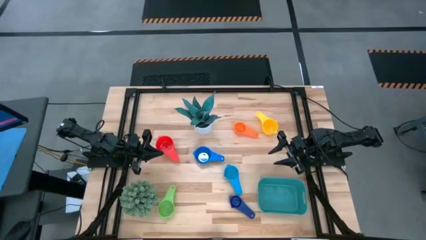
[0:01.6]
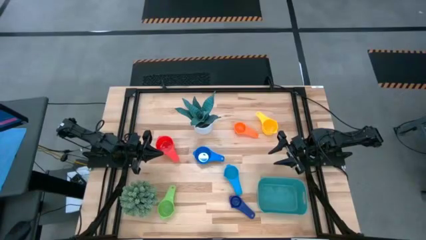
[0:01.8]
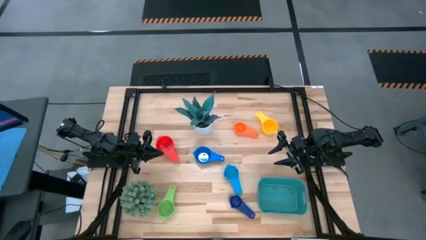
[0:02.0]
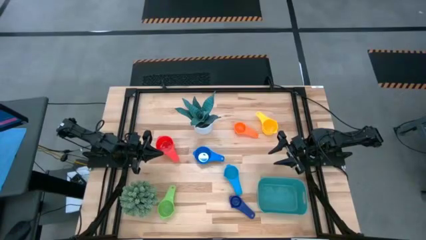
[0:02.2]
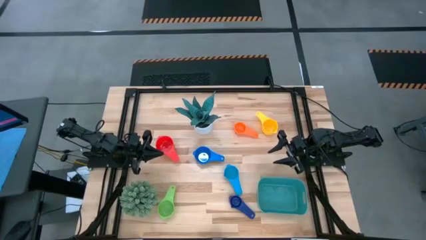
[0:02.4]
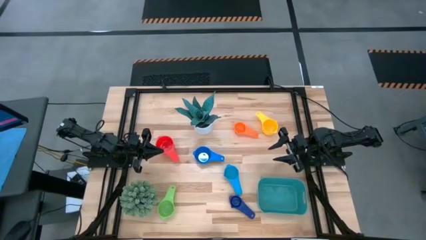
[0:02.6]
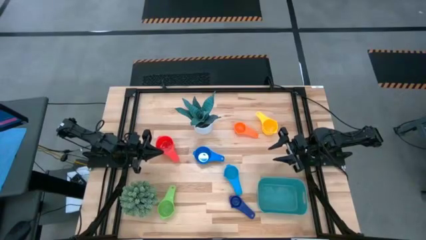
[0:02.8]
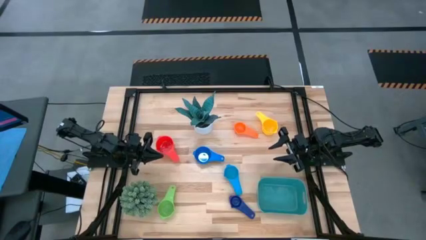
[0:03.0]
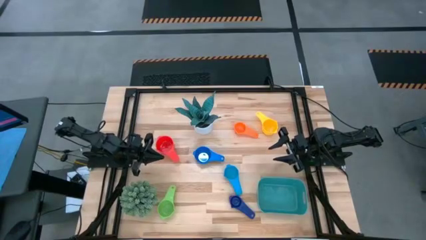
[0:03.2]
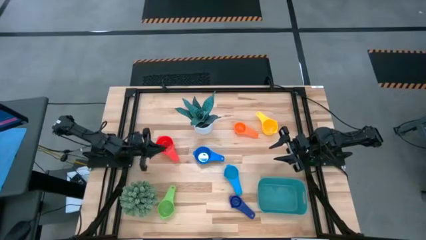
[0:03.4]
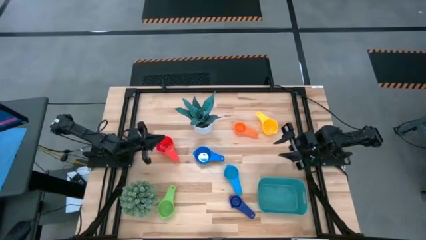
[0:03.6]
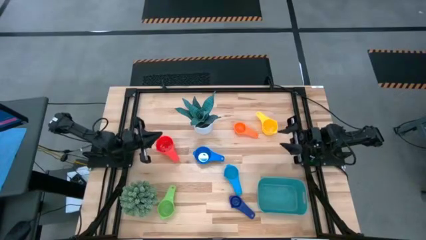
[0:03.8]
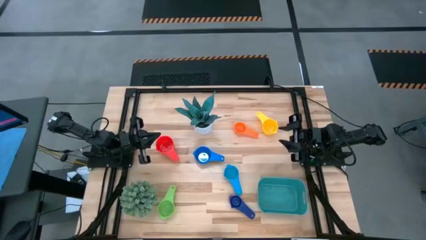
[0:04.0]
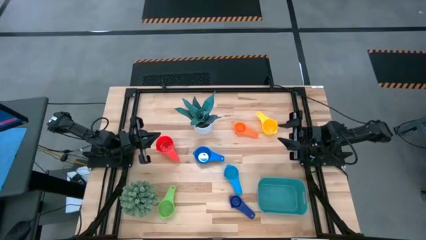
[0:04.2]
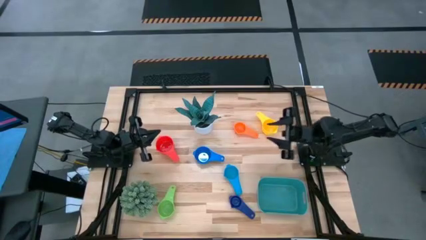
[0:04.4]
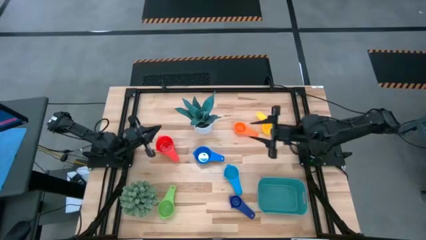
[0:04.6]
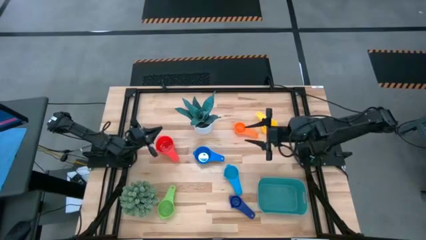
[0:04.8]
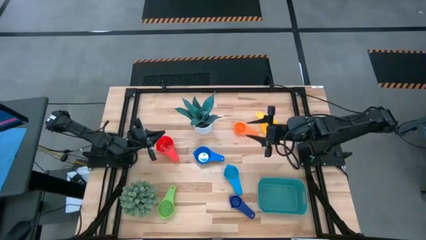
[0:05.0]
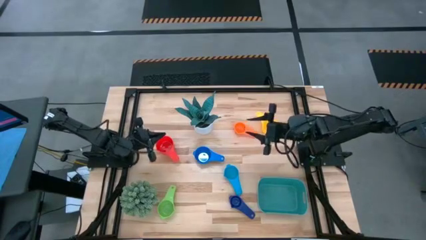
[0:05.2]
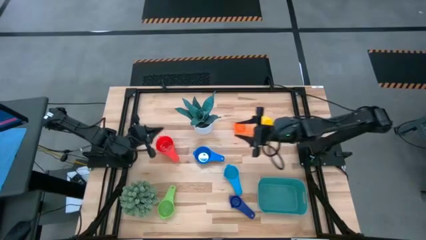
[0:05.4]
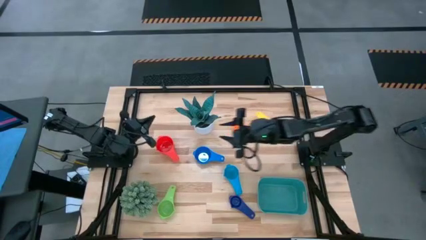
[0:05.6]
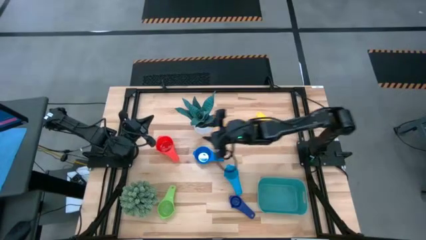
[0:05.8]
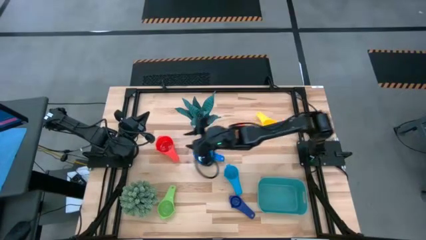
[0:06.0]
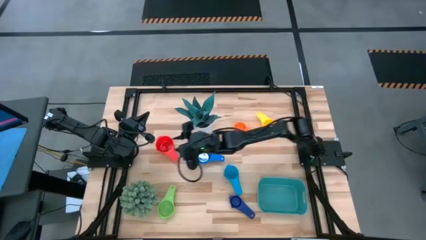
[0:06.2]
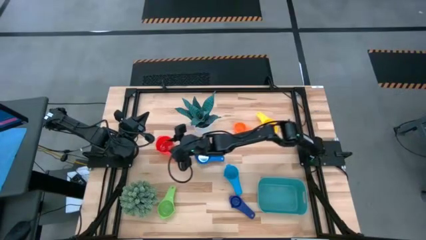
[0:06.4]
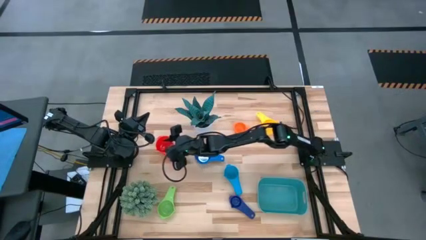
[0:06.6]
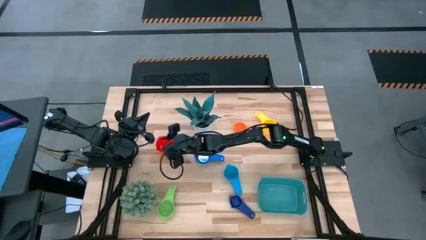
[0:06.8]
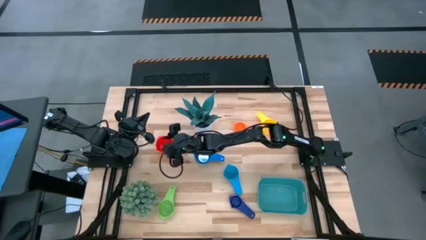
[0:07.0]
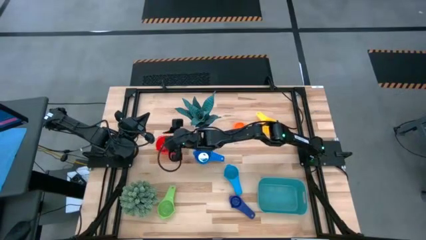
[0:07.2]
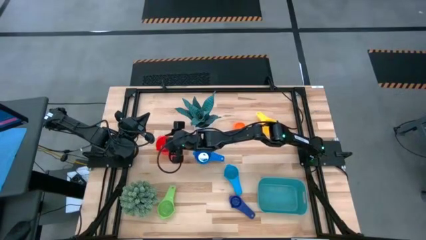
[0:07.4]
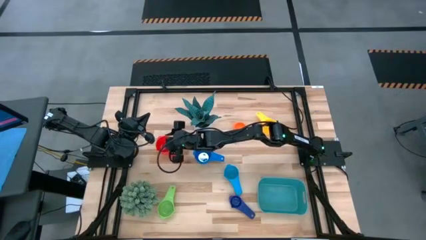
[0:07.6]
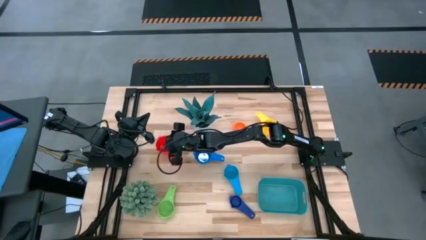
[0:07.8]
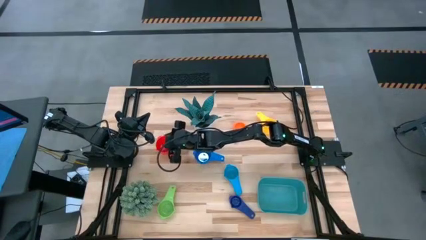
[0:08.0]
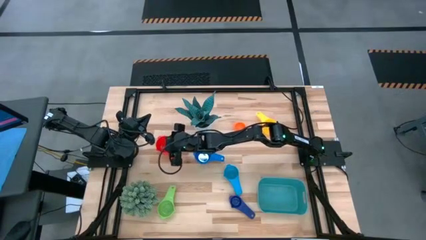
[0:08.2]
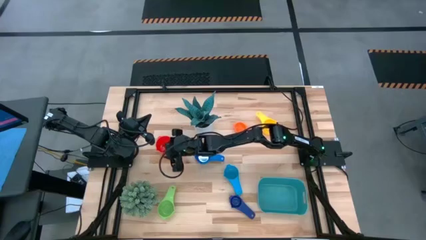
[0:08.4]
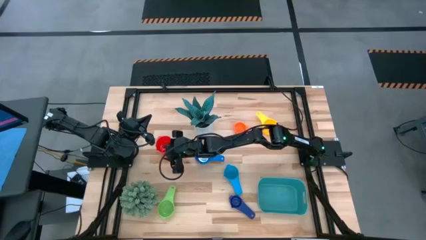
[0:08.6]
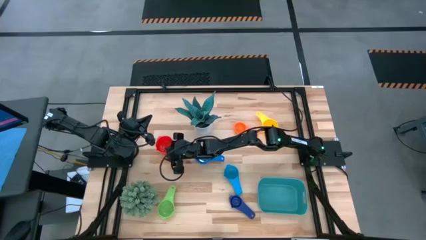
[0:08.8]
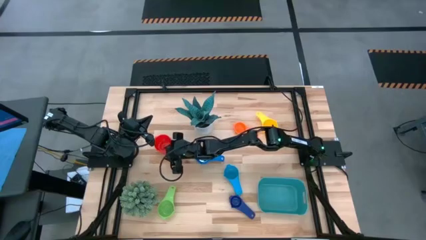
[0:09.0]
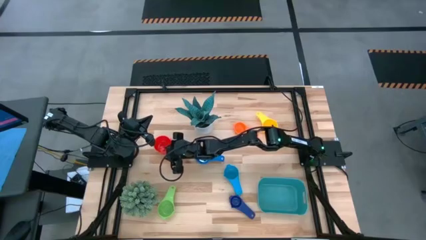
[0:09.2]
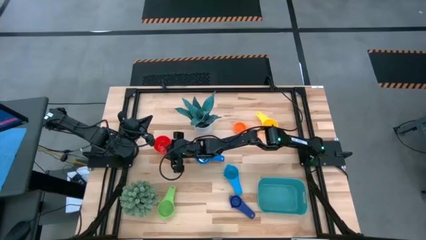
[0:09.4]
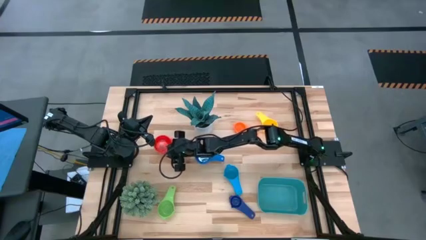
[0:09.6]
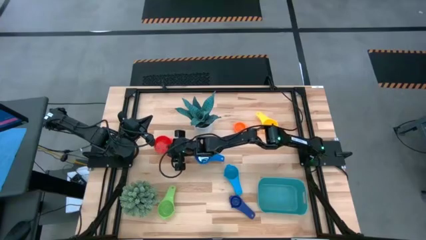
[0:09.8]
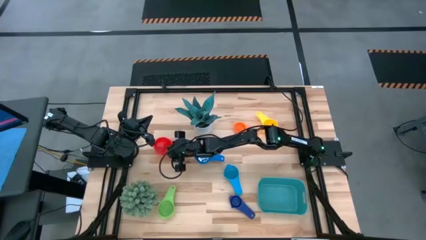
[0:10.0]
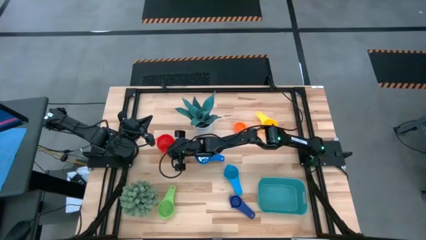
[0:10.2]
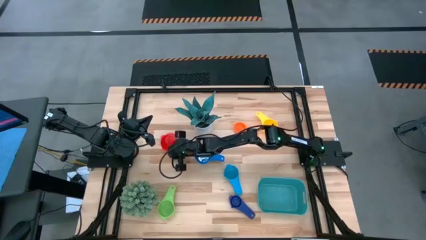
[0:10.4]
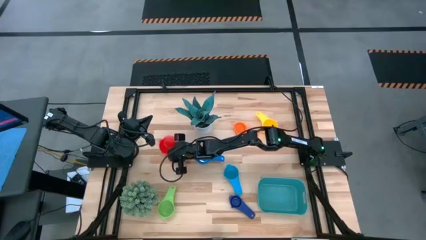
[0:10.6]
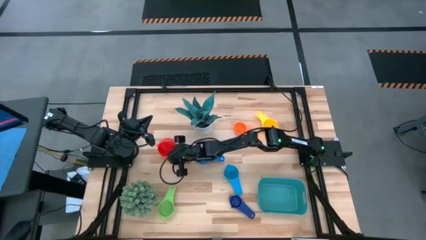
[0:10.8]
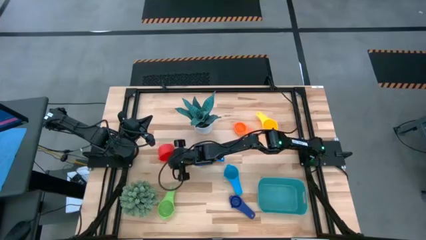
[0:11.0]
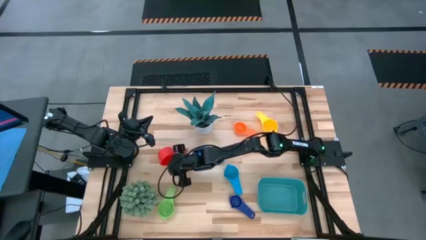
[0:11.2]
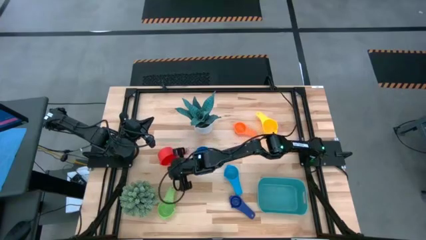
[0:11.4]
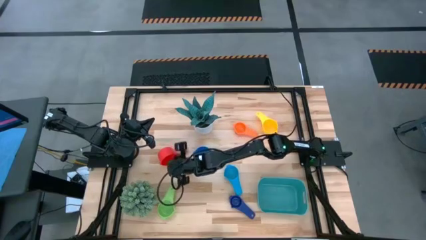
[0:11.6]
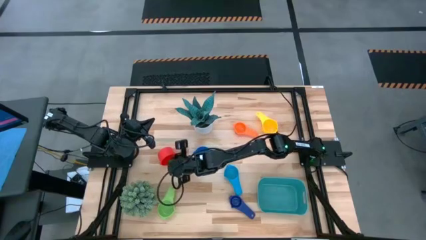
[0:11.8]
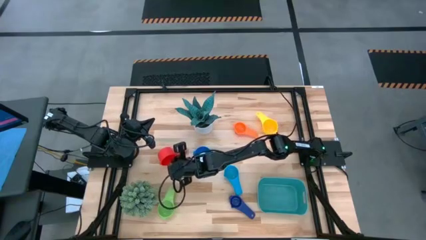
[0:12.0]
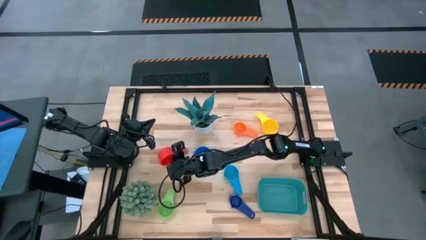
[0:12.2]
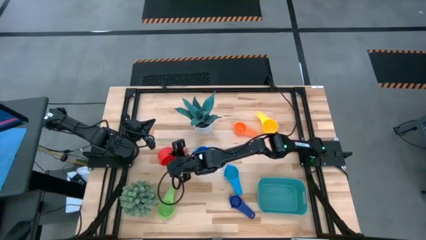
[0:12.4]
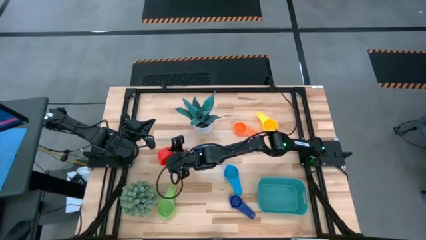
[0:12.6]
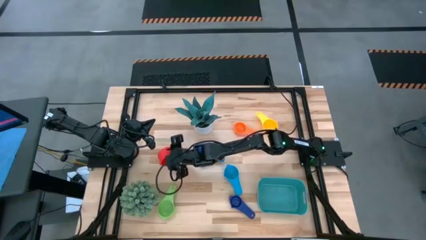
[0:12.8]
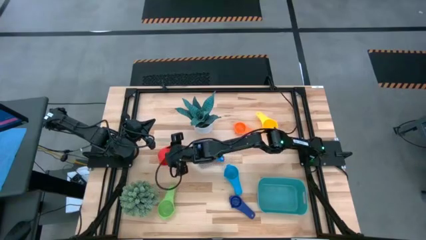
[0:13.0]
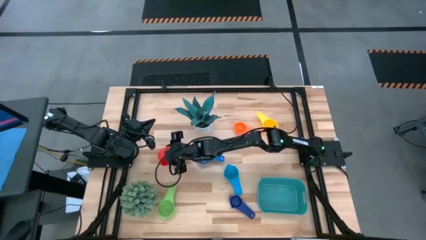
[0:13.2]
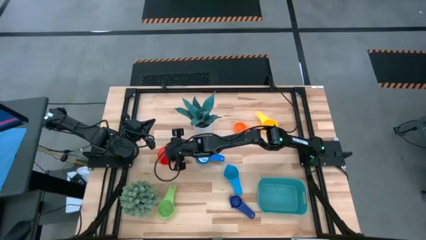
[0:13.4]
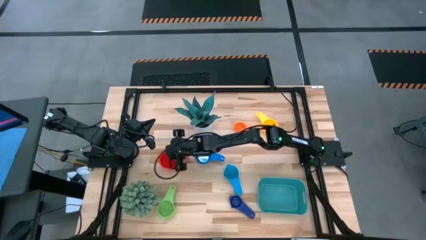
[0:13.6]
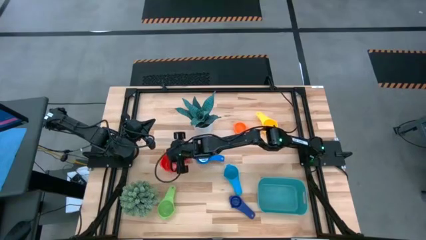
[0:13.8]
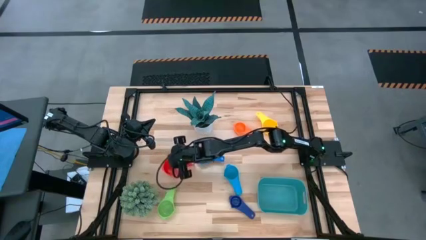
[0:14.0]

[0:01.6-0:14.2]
Task: Nest measuring cups in basket
Move the orange measuring cup to the center right of the table

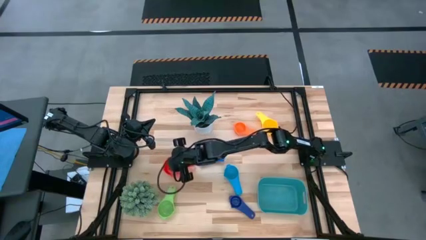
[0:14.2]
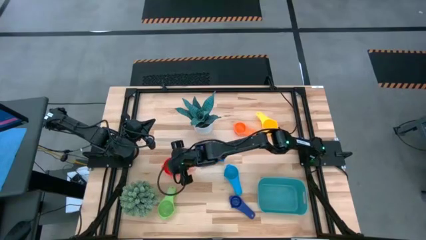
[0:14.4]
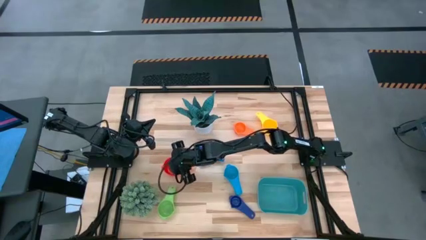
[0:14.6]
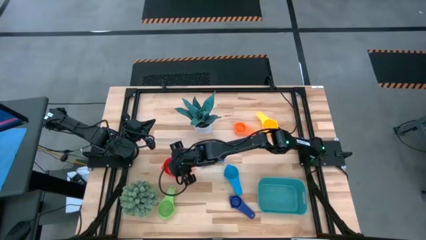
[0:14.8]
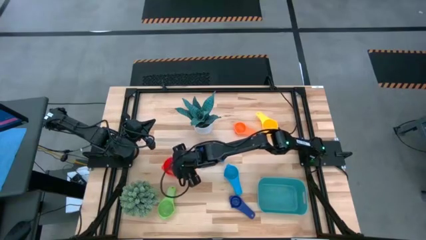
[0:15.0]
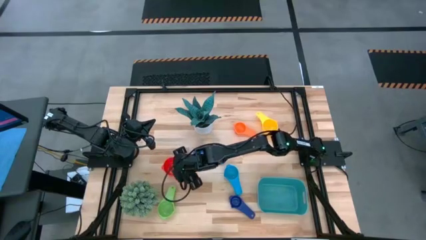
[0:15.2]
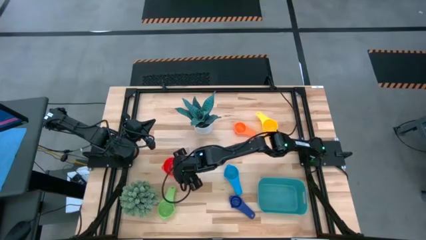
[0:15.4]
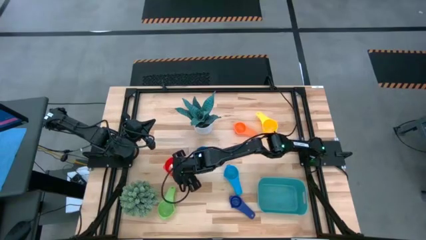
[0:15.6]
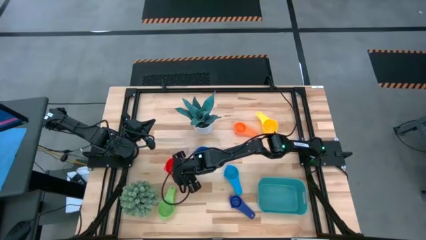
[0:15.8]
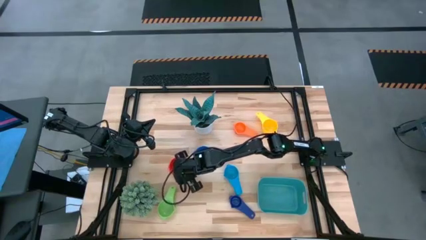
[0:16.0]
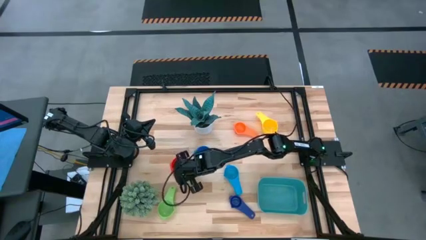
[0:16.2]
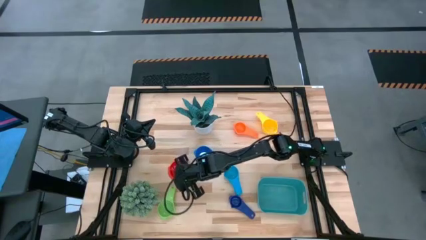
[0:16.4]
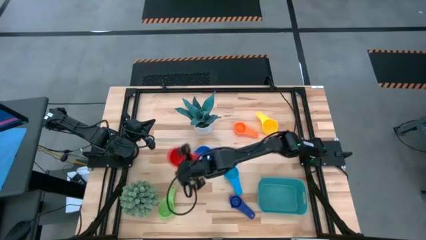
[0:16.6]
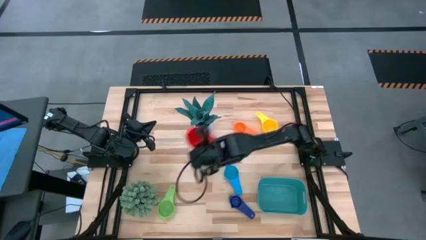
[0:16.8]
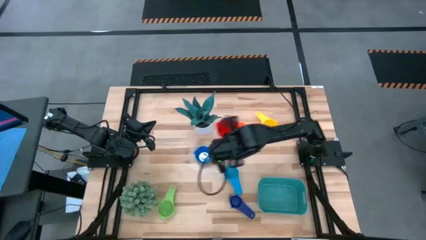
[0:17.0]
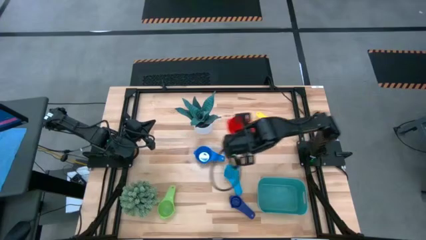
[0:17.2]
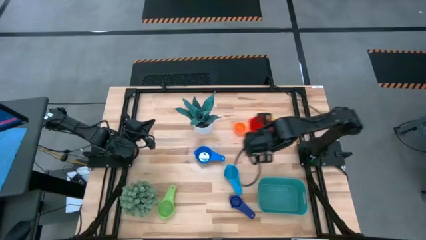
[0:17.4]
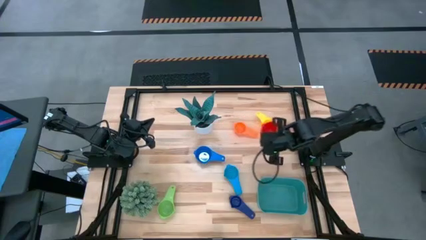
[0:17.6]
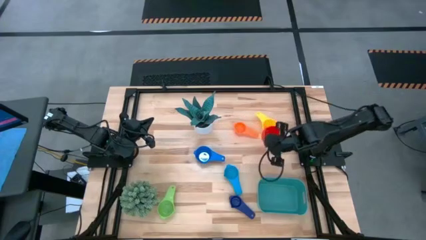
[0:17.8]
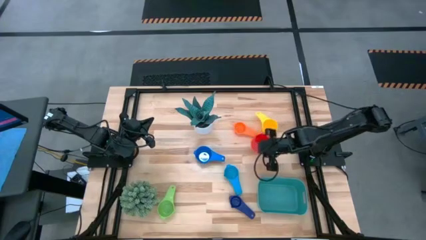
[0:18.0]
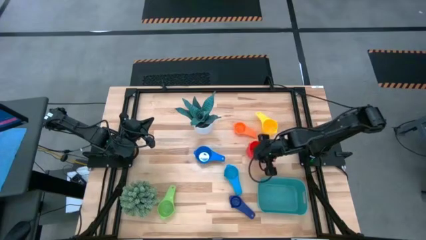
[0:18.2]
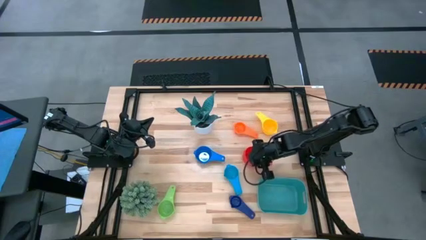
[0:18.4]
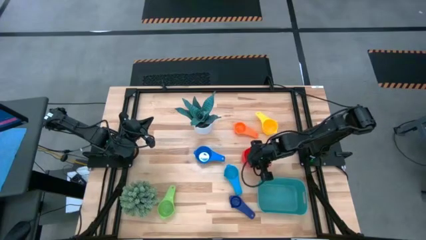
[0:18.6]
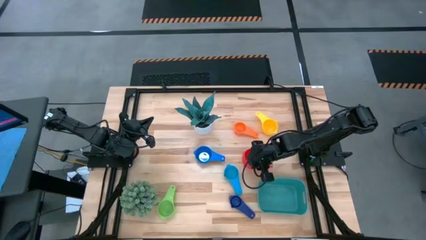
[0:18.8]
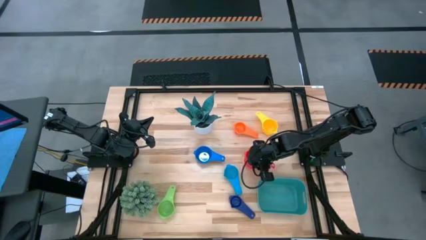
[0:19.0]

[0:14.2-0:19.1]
Move the orange measuring cup to the center right of the table
